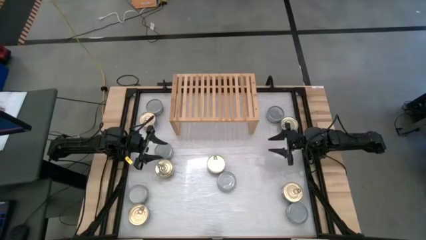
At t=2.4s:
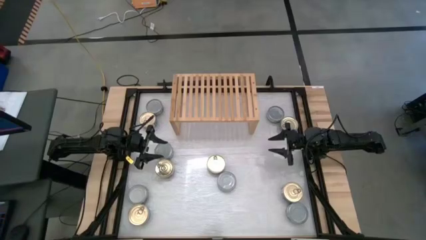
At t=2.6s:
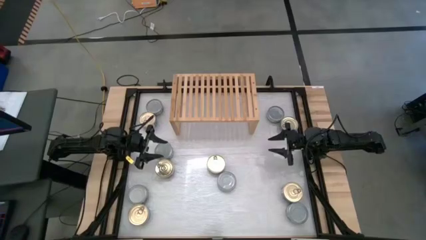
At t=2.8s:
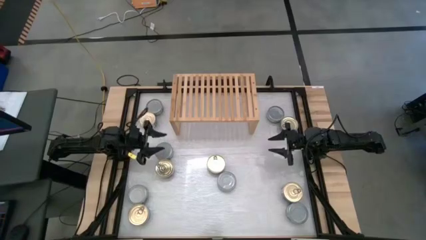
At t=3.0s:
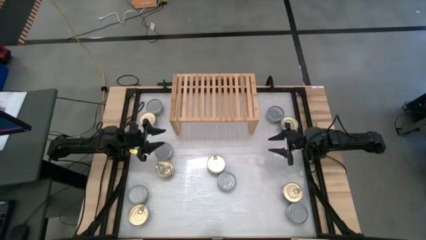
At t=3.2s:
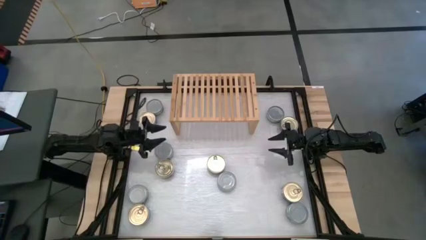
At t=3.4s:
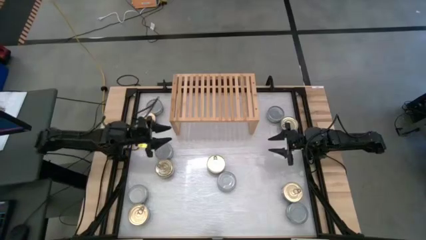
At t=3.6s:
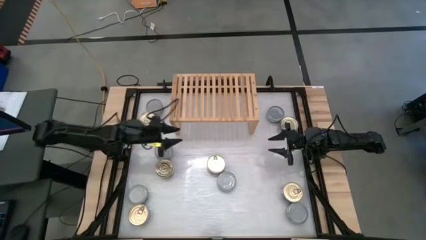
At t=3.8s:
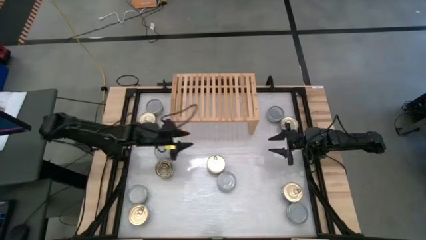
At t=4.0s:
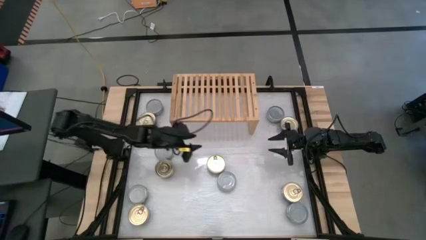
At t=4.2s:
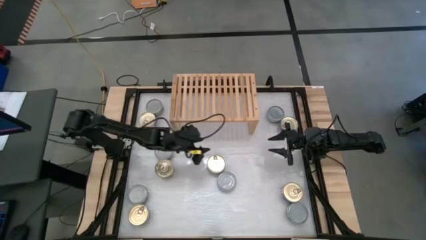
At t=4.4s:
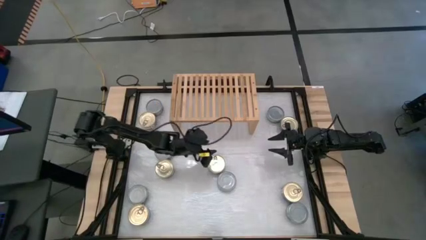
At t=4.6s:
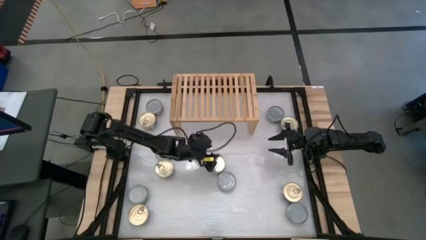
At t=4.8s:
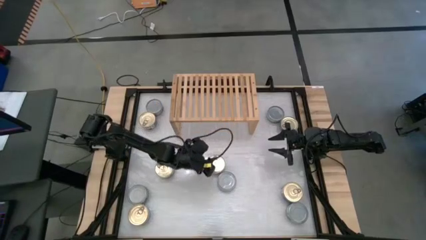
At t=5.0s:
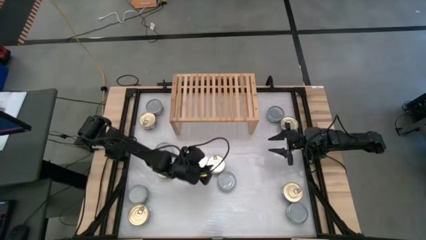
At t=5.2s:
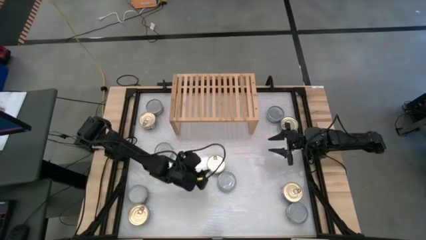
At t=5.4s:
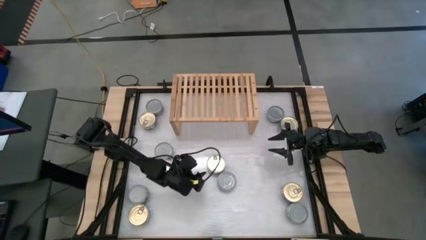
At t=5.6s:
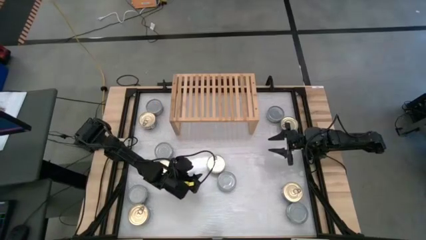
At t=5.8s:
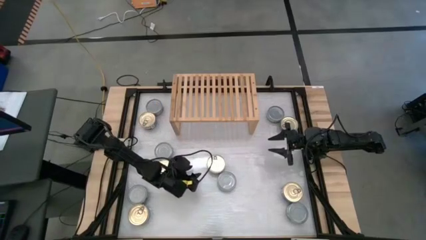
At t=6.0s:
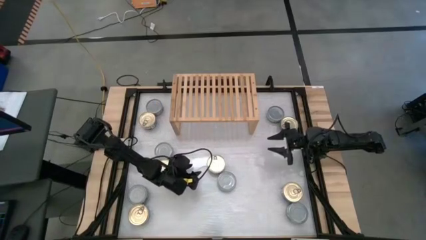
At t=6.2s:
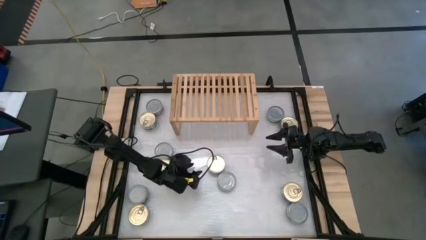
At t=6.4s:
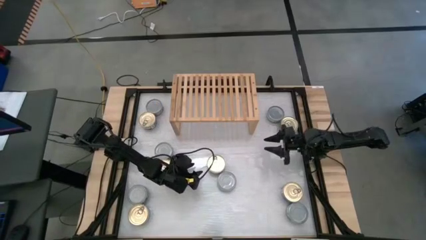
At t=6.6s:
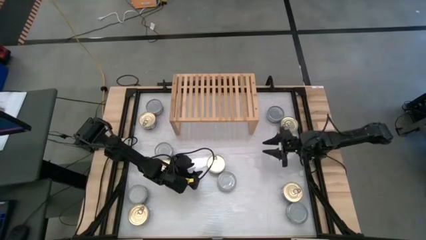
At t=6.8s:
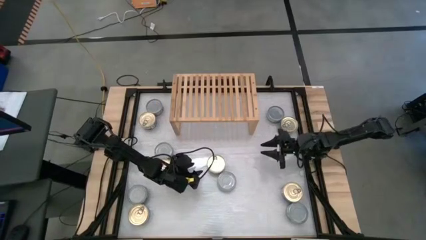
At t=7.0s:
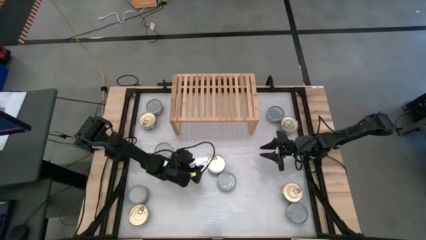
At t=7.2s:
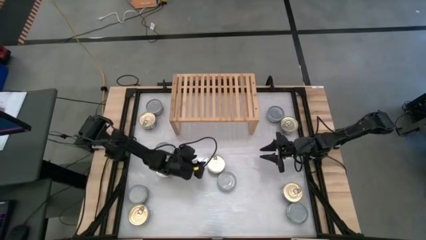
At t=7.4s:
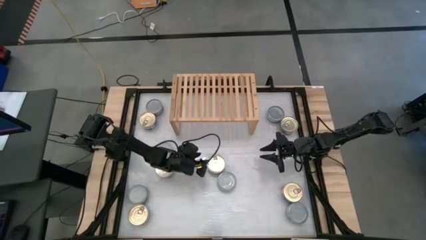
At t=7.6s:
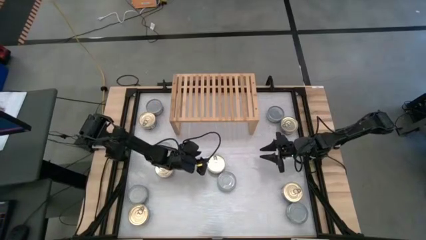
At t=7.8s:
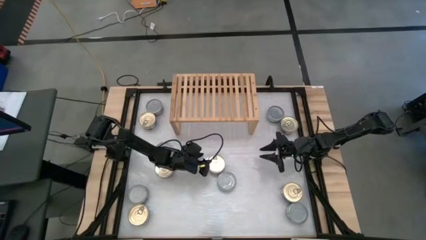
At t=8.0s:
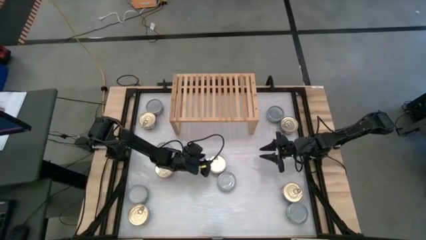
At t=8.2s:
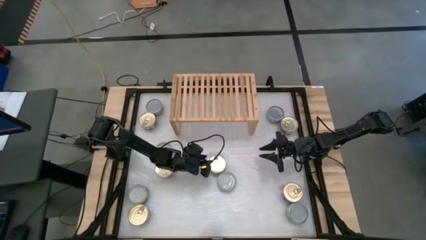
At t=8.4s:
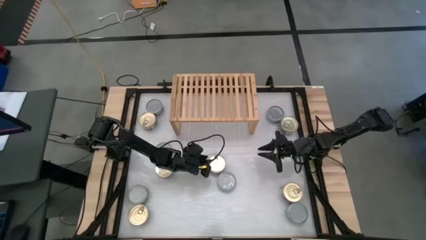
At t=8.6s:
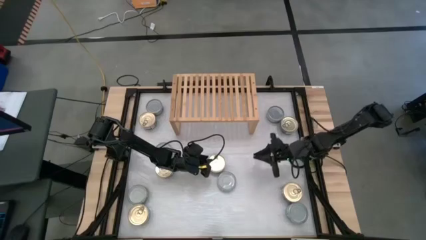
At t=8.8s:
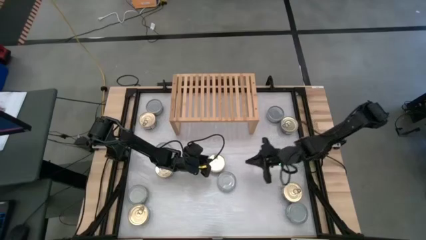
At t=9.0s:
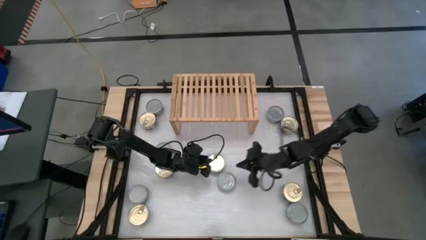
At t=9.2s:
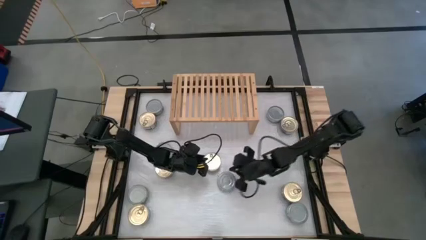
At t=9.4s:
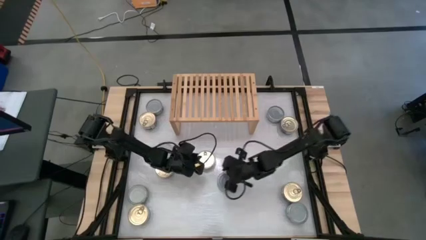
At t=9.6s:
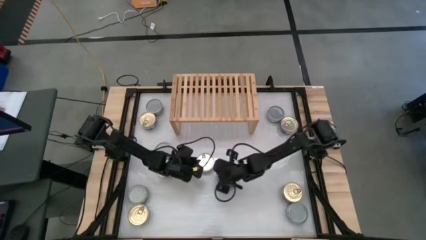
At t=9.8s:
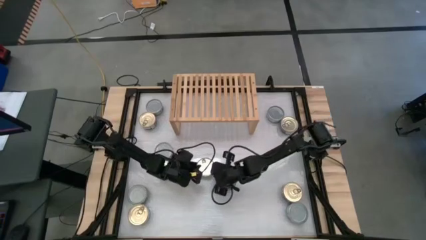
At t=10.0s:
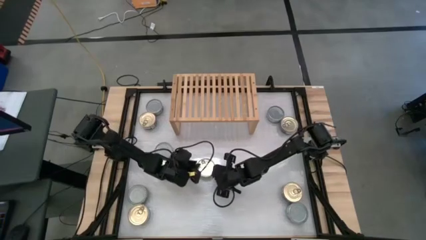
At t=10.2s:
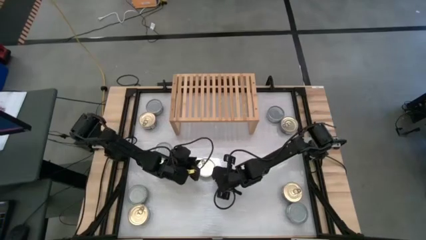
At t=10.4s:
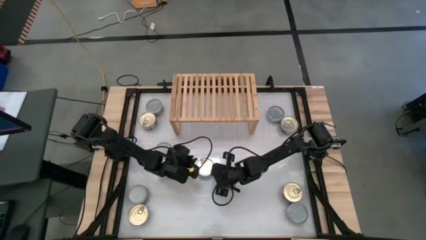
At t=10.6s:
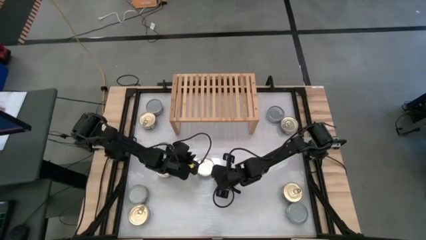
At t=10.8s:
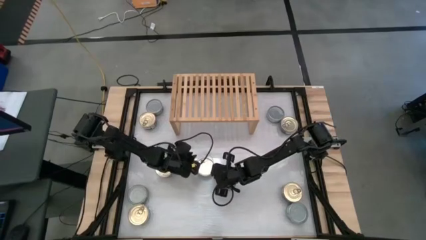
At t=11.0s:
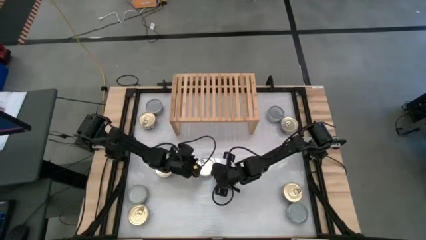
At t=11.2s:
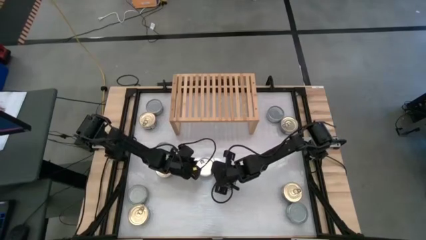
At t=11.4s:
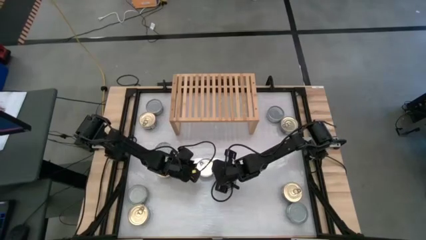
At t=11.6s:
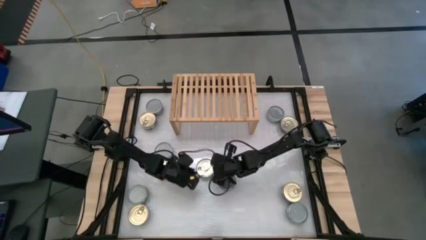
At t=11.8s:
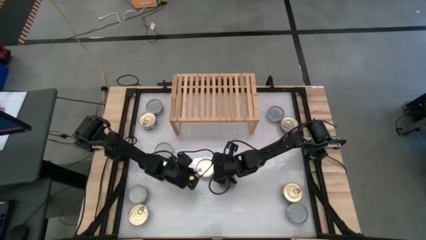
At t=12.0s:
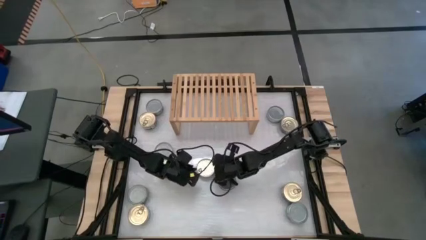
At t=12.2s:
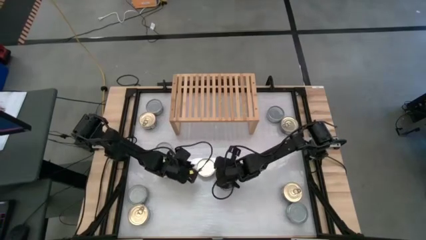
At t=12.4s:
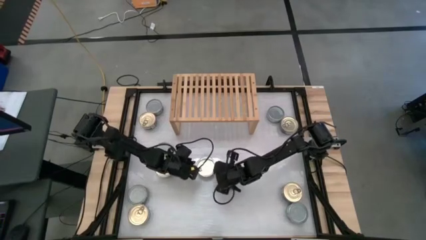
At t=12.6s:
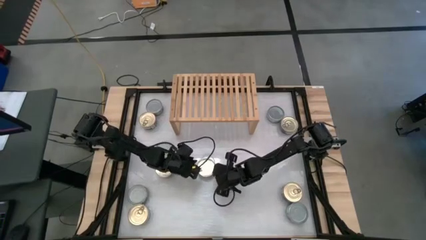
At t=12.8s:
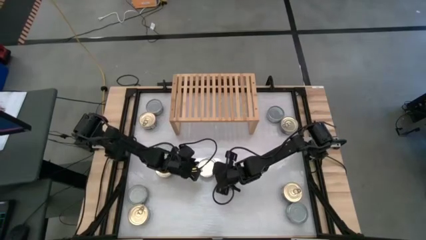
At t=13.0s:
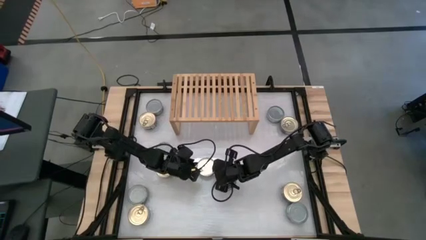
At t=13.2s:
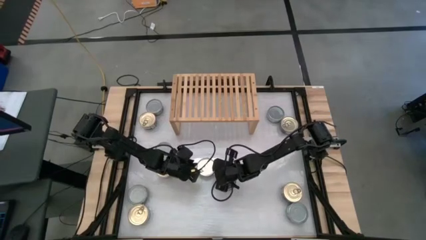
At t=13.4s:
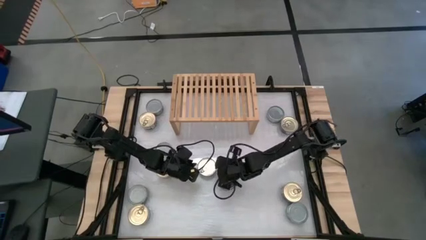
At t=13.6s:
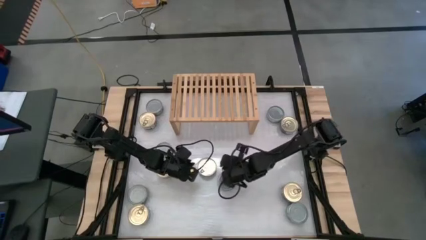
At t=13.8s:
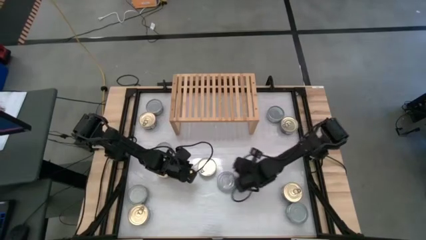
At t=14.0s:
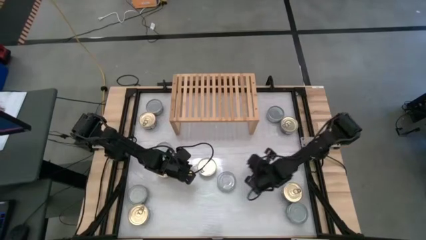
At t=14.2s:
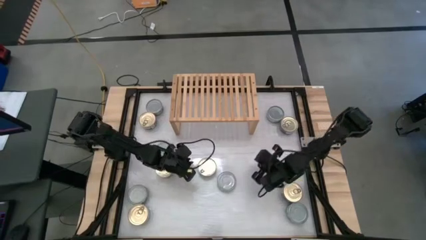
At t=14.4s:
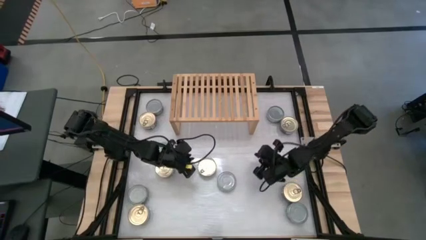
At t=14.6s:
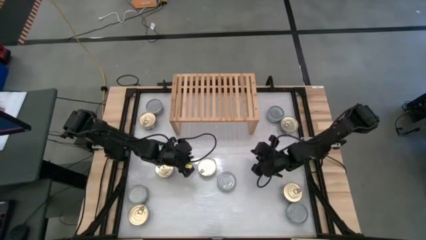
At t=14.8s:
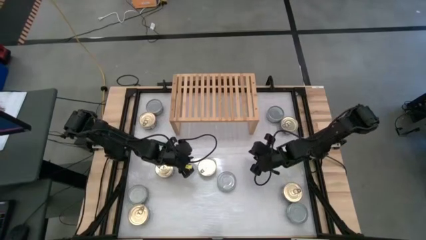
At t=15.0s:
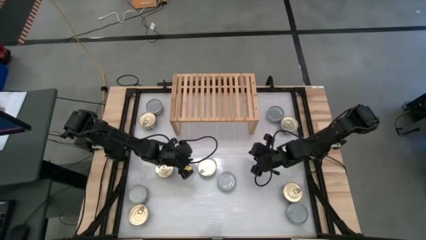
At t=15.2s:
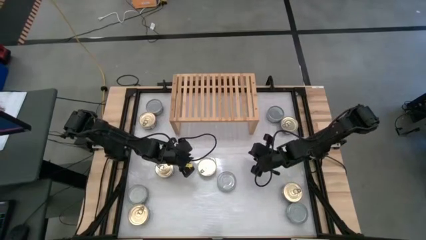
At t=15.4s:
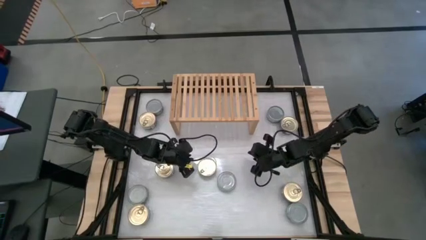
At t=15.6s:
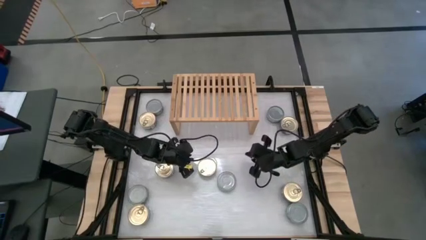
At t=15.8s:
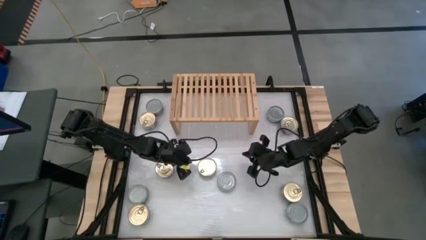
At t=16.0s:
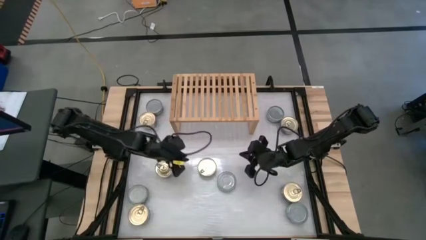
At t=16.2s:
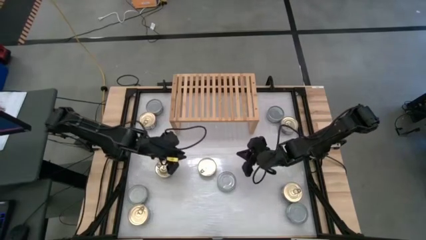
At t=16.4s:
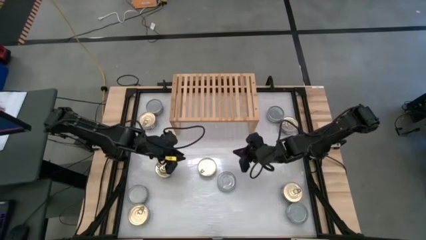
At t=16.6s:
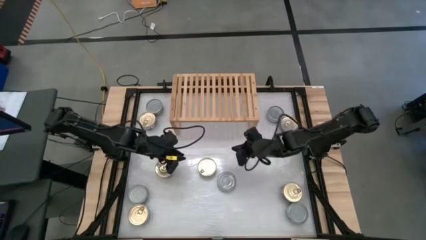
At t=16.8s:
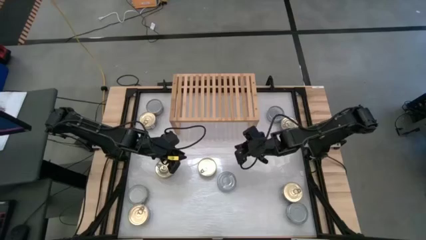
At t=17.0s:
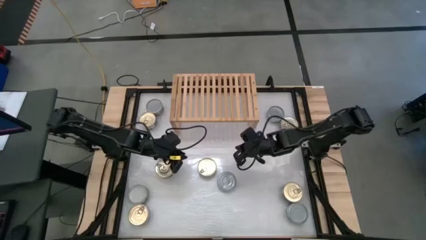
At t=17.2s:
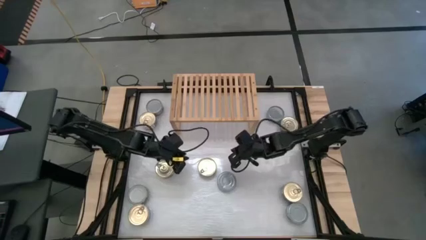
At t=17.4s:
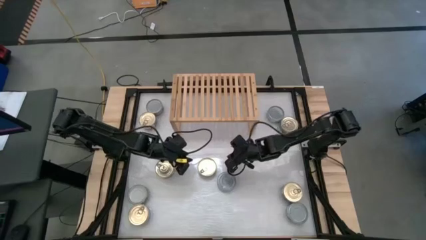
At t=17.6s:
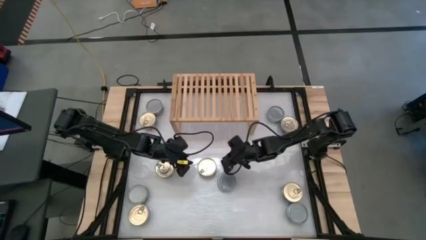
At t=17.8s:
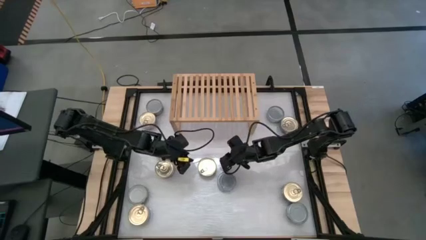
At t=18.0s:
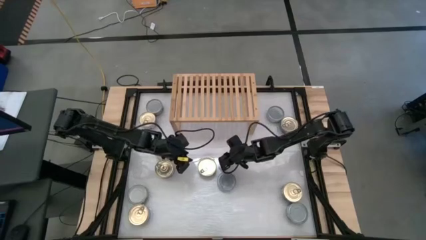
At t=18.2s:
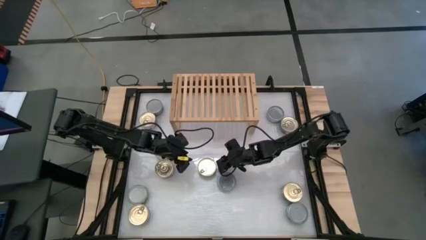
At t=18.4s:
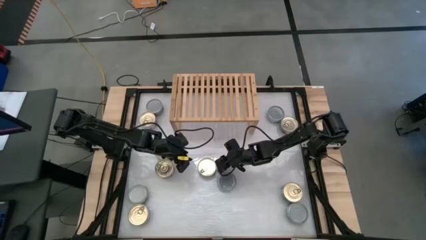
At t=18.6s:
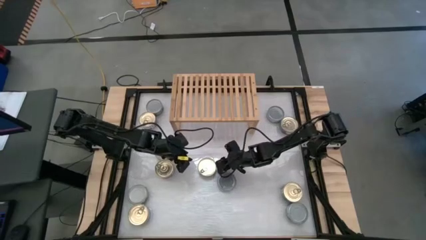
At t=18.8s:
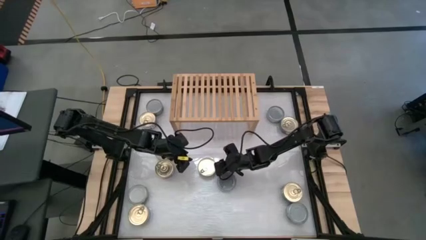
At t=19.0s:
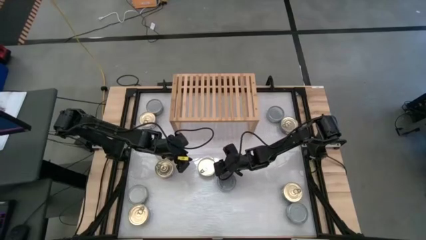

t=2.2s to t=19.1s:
Task: Stack canned seafood by type on shelf
Put the blue-pink tuna can on the shelf
